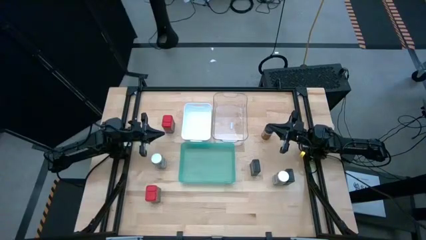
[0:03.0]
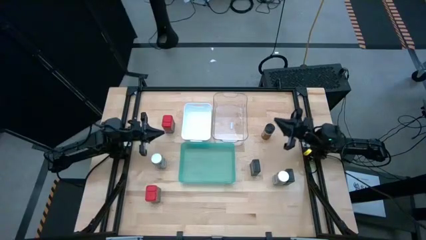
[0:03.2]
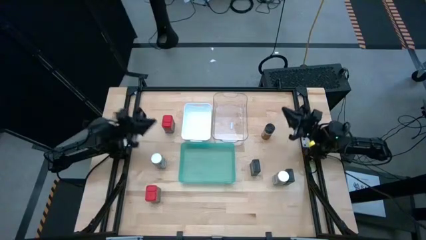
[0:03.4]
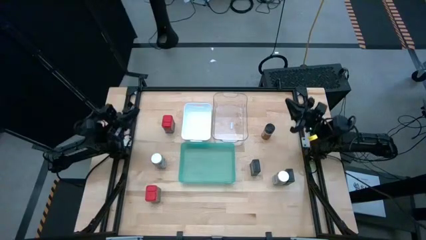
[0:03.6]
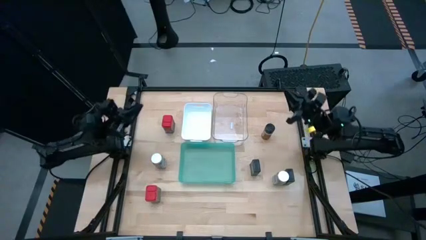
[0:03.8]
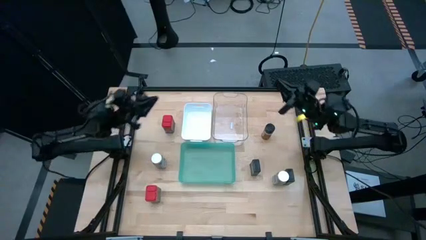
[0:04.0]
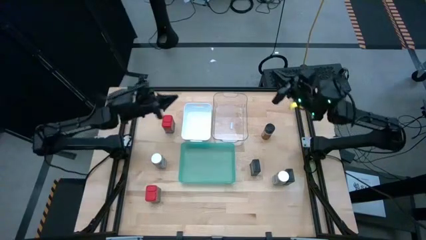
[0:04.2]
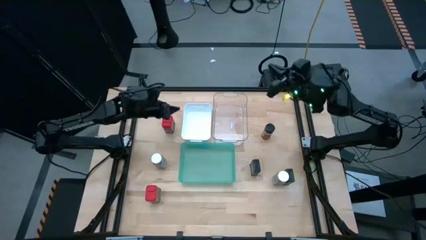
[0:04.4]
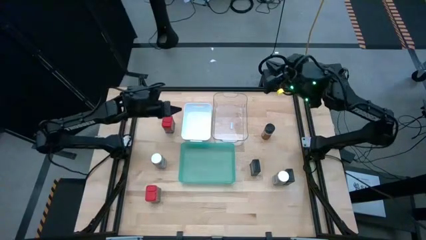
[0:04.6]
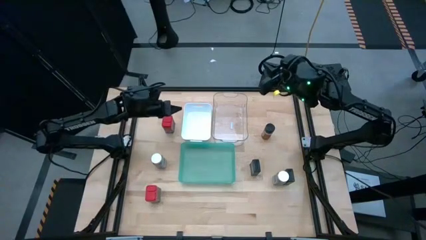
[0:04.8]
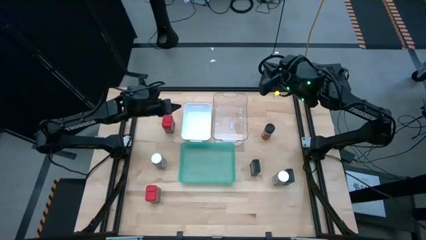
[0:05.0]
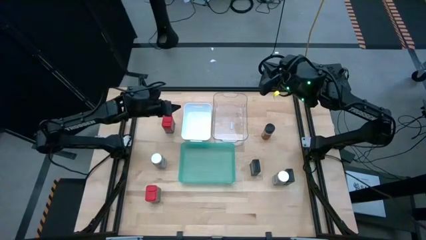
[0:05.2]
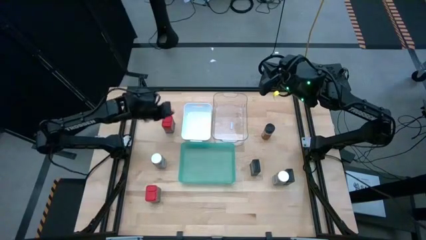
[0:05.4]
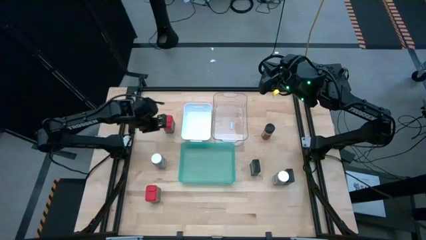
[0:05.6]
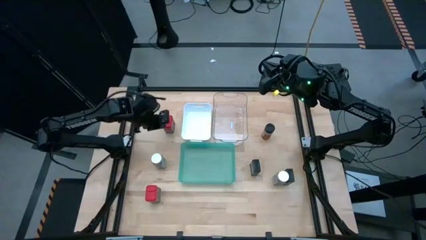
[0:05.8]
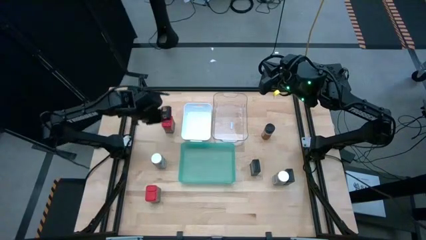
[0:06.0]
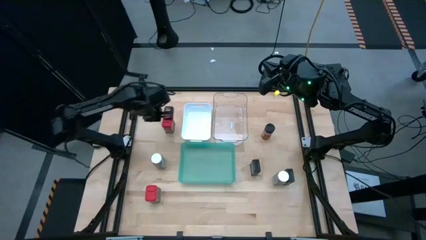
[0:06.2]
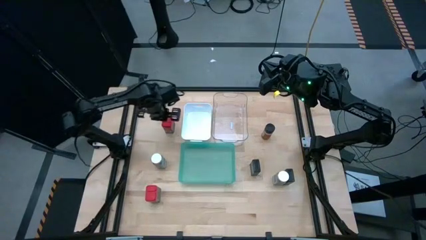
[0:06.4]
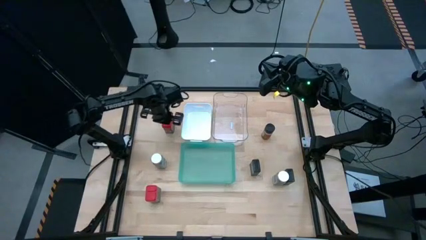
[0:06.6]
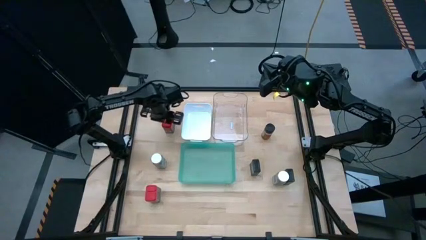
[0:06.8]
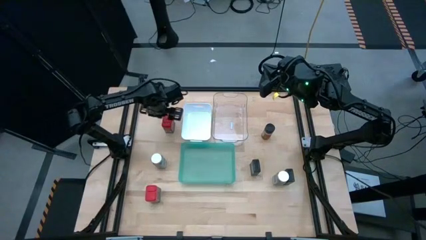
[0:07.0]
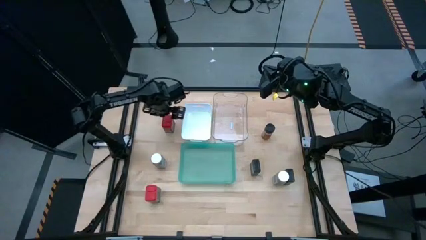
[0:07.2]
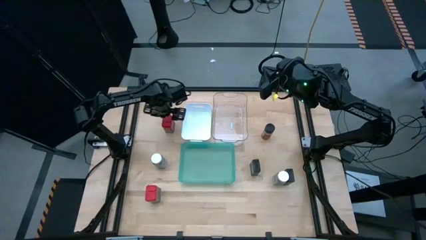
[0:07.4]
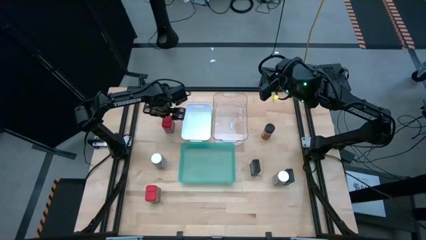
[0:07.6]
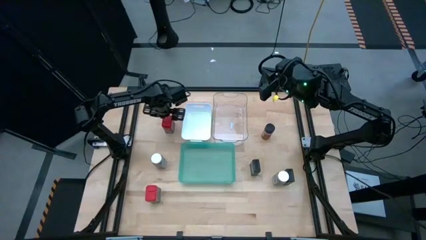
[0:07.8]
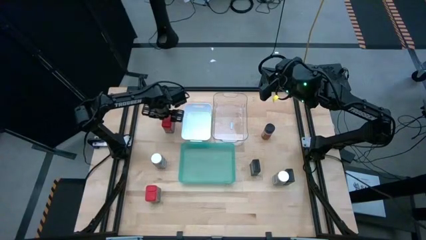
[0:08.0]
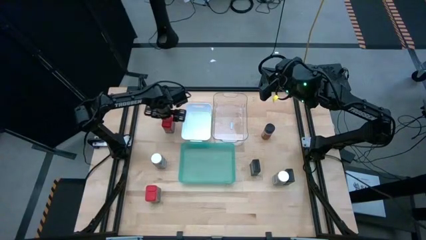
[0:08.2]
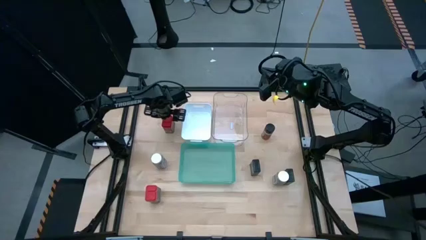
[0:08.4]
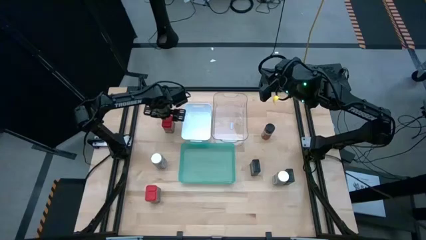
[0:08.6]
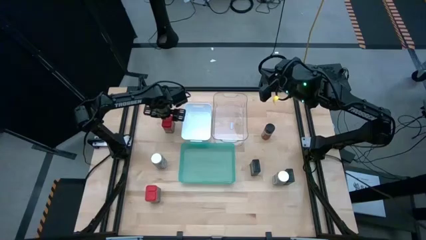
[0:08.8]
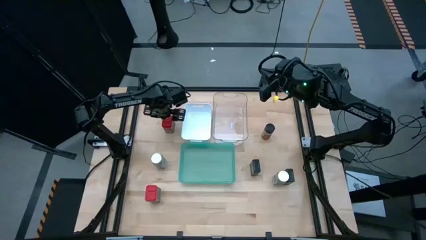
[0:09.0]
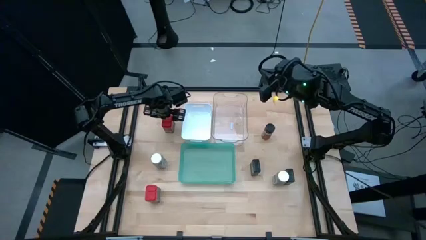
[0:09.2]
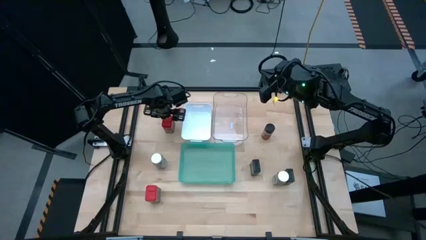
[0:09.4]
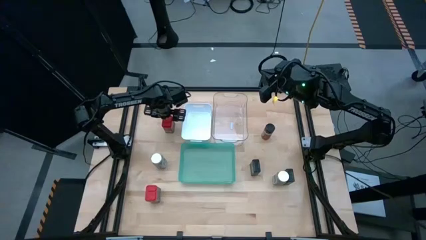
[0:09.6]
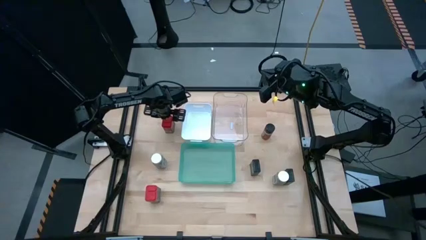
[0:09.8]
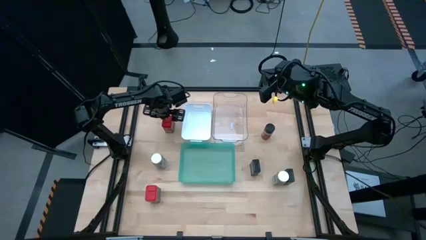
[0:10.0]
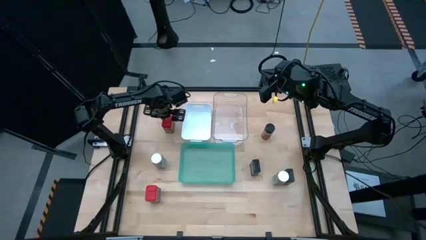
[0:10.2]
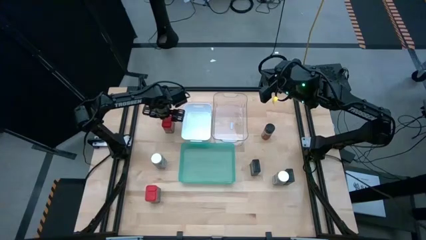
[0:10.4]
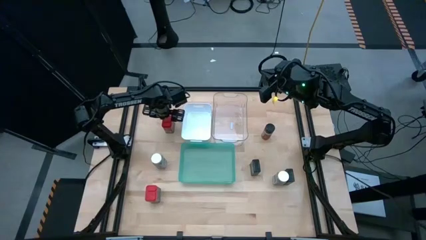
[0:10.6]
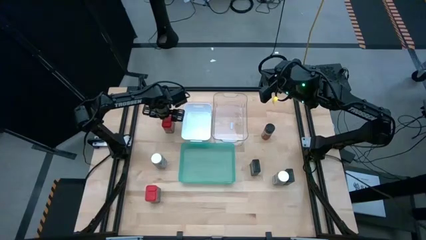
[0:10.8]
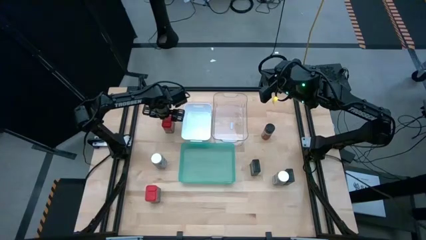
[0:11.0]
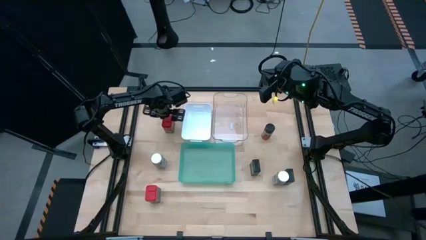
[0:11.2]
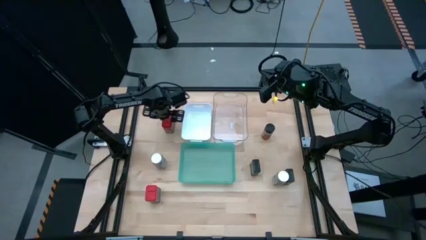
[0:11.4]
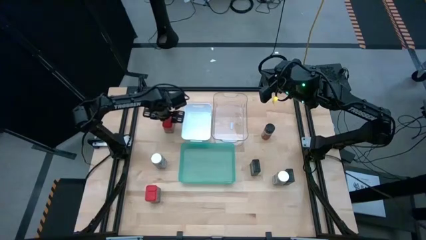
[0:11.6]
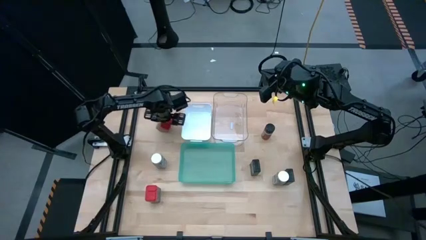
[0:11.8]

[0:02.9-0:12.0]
Task: Sort spices by type
Put the top red spice can into the green bin

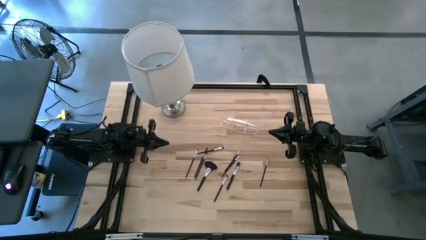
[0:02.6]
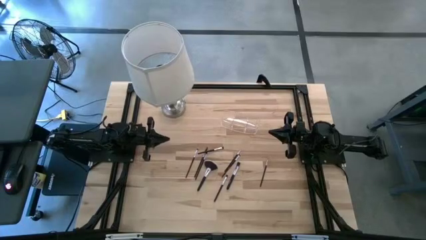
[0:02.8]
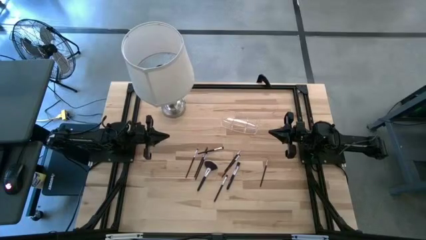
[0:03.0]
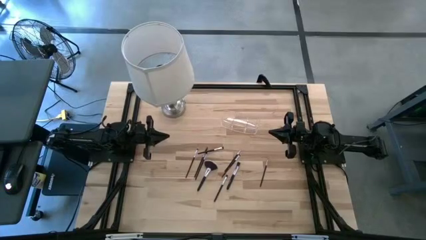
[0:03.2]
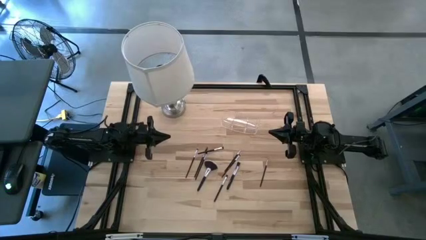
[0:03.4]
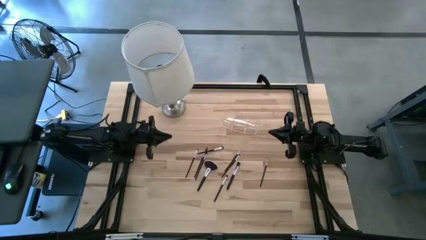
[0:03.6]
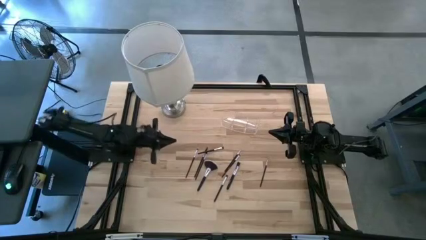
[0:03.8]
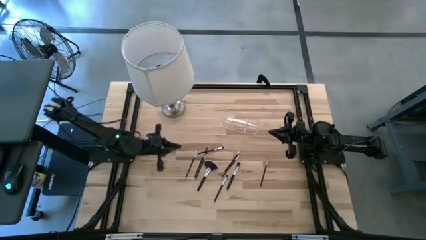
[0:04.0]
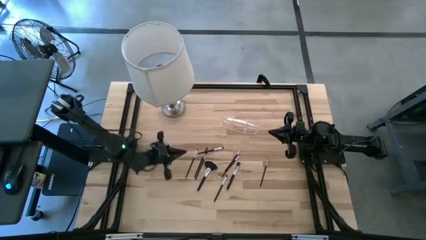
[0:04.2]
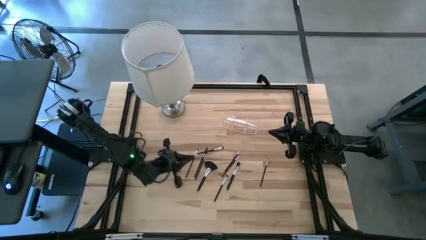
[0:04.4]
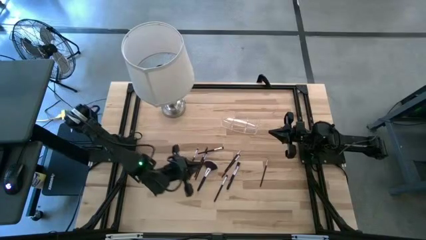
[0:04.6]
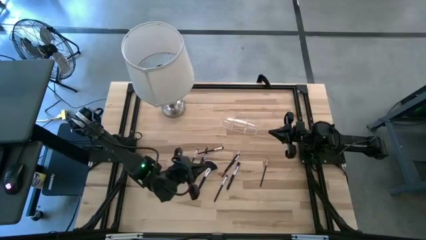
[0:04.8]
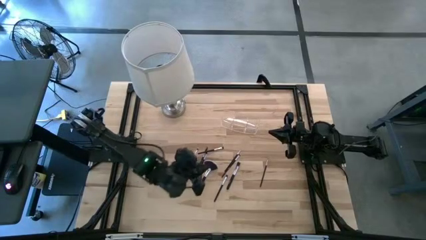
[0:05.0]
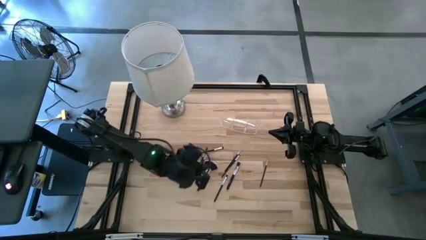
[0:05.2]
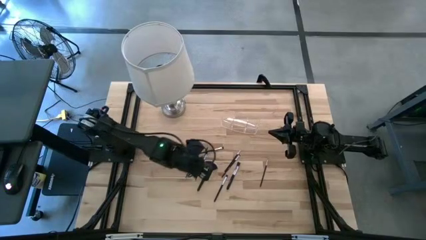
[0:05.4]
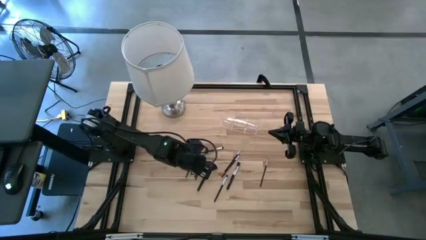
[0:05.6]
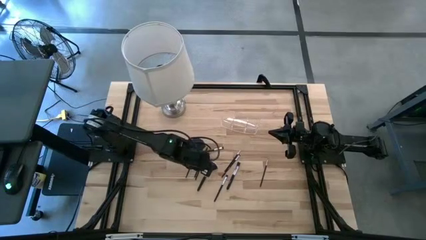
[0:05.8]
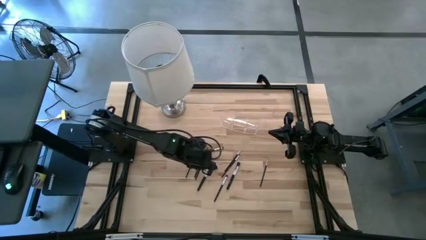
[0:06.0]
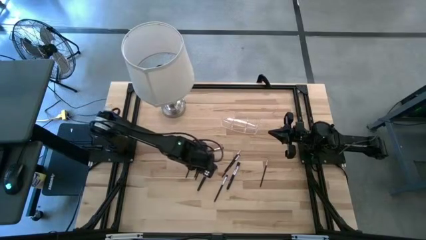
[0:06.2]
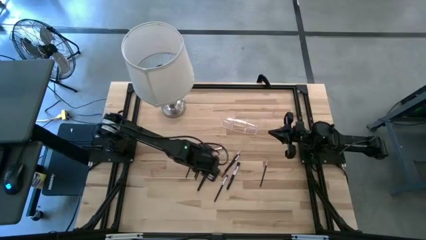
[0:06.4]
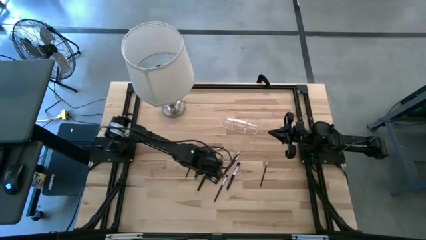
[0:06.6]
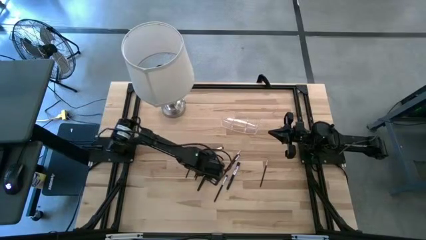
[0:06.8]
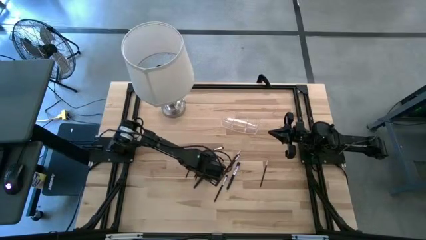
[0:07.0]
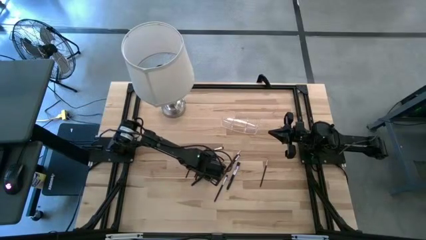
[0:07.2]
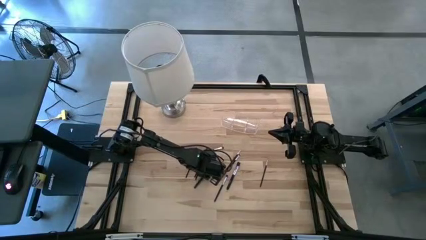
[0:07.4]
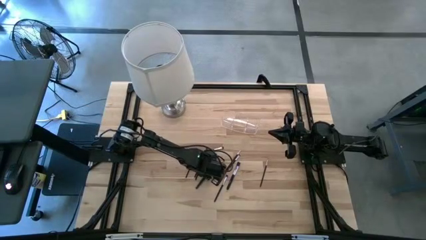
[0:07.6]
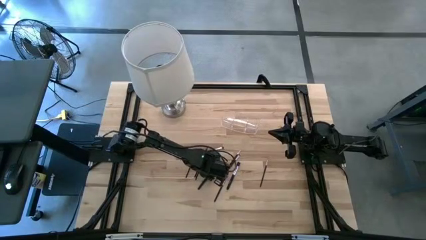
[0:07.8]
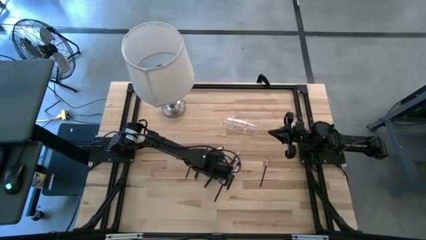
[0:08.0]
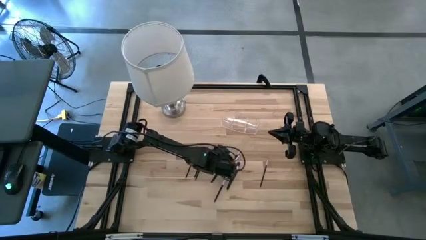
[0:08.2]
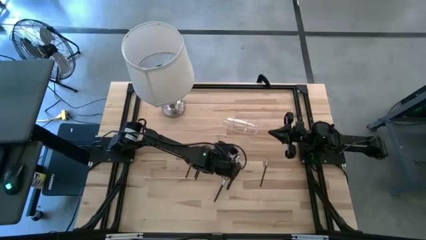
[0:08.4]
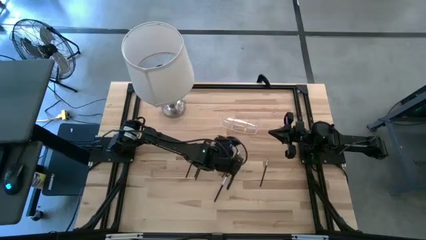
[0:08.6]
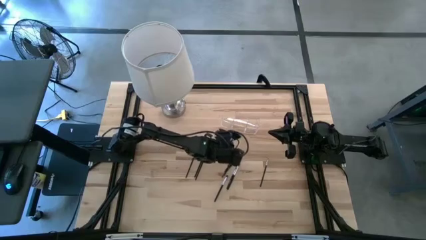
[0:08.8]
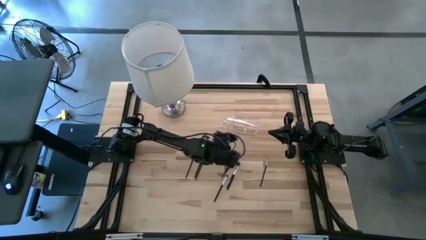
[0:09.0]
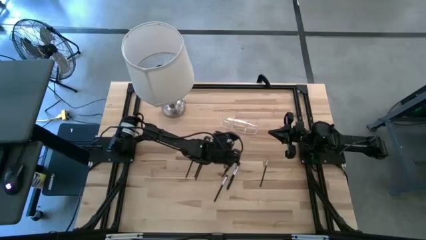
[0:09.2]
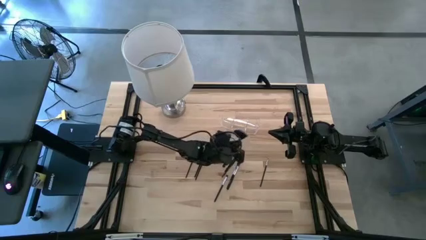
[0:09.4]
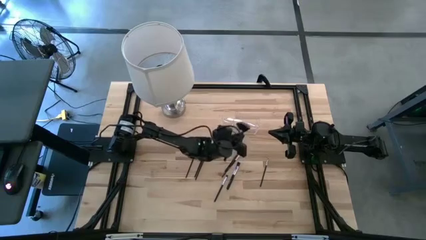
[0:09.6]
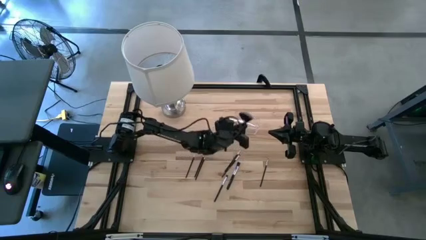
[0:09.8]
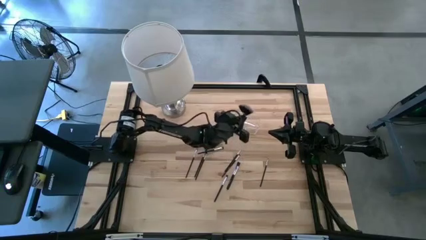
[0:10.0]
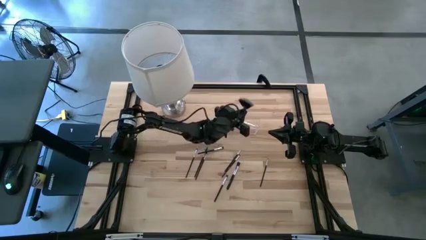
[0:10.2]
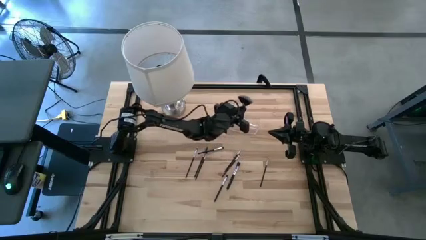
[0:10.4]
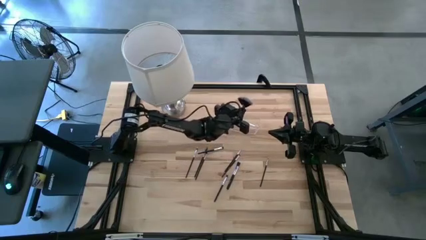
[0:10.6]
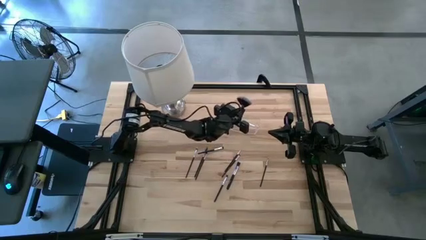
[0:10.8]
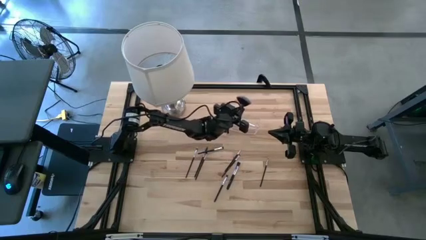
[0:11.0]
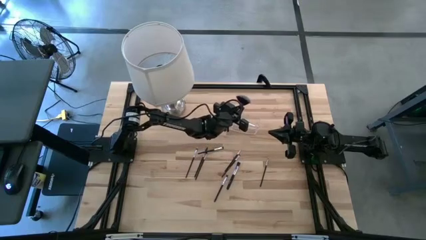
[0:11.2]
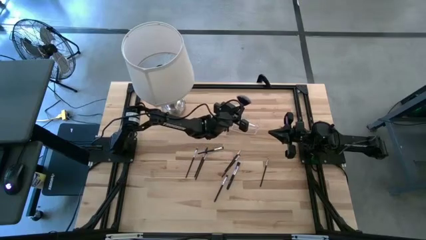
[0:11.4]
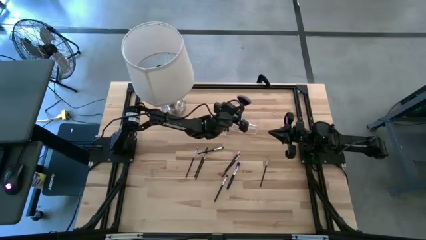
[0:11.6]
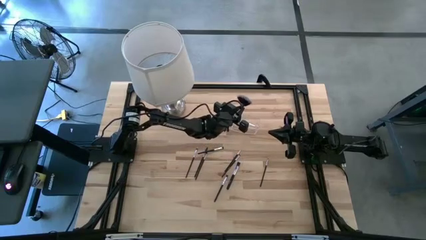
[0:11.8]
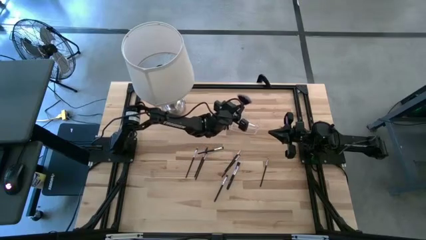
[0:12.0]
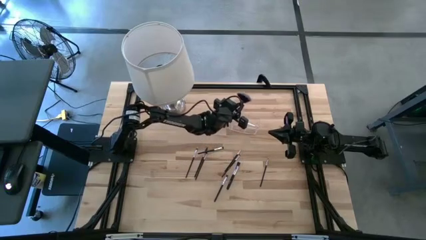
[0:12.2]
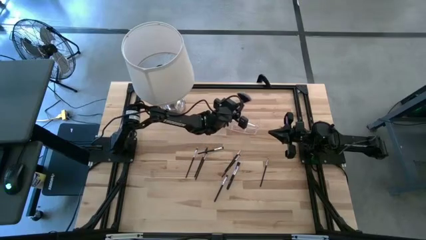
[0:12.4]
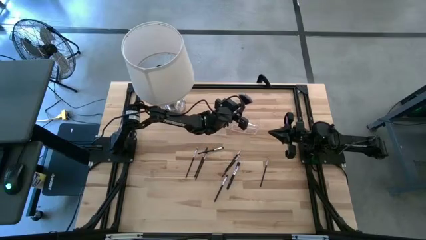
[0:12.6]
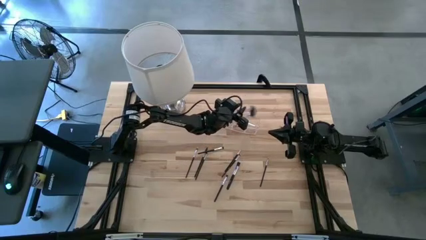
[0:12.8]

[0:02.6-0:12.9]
Task: Pick & Place Makeup Supplies
Put the makeup brush into the transparent organizer
